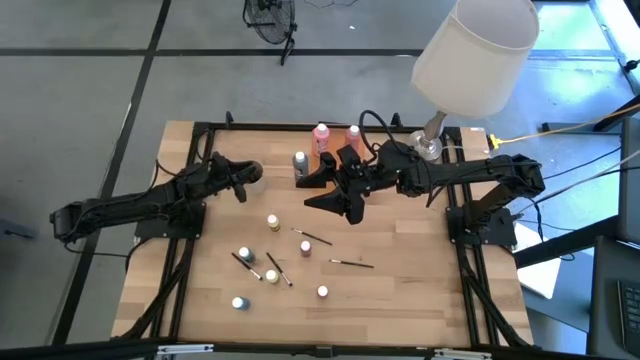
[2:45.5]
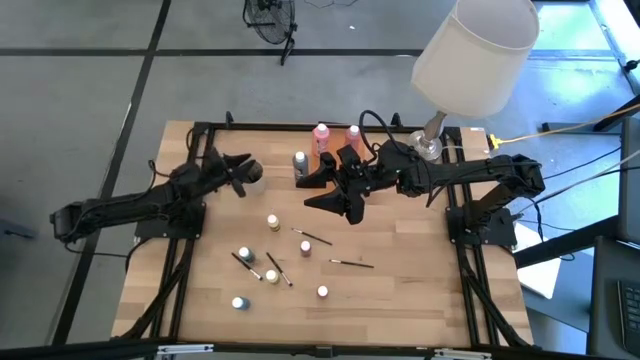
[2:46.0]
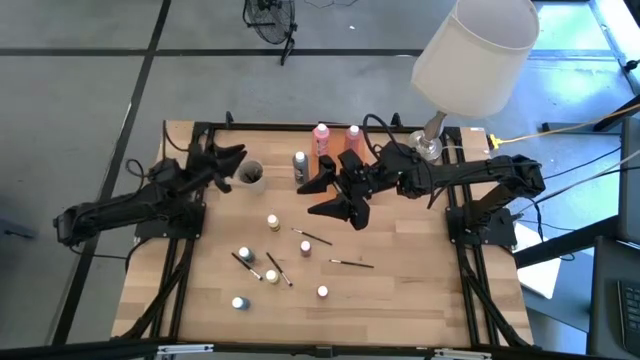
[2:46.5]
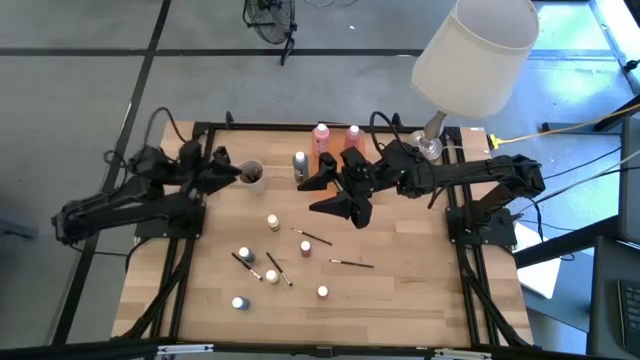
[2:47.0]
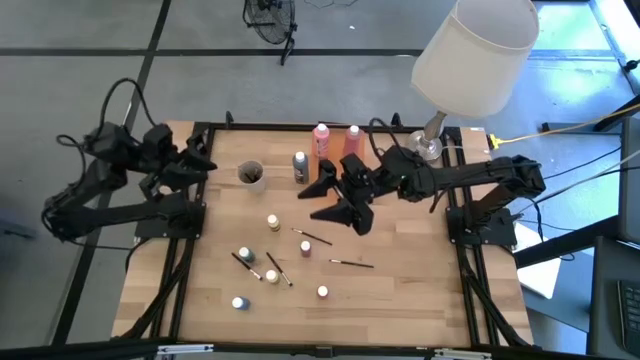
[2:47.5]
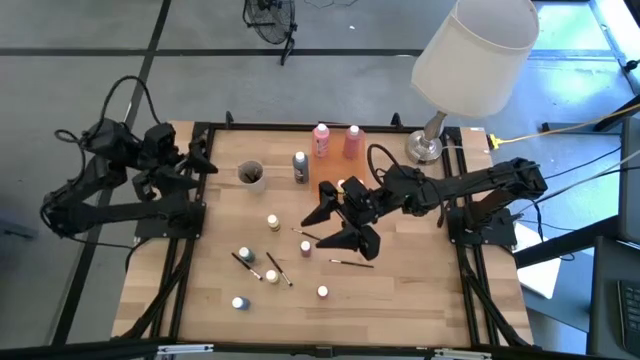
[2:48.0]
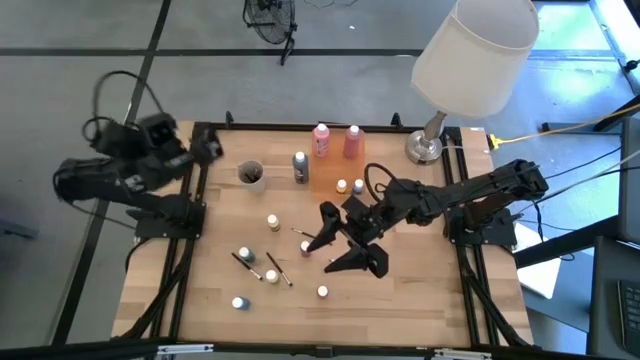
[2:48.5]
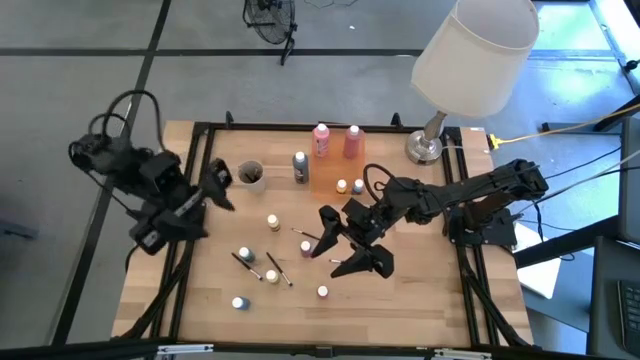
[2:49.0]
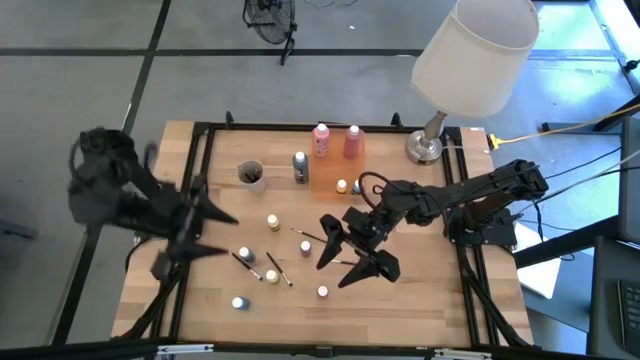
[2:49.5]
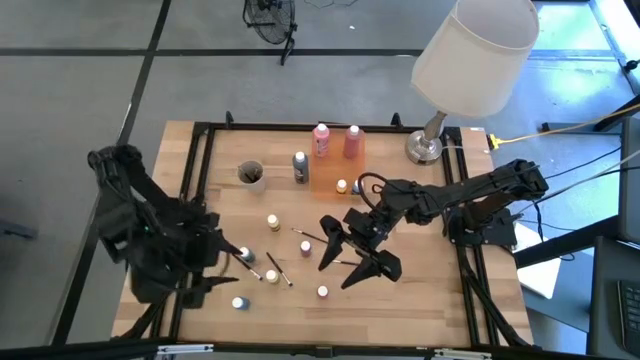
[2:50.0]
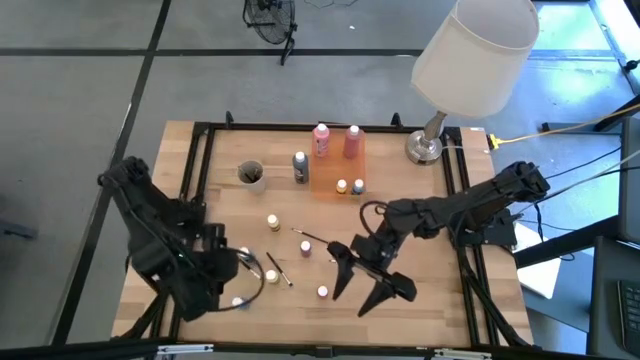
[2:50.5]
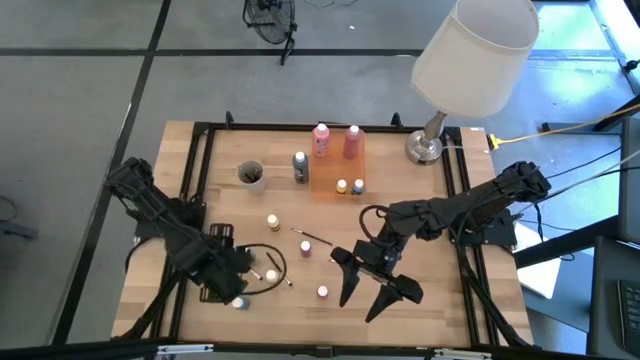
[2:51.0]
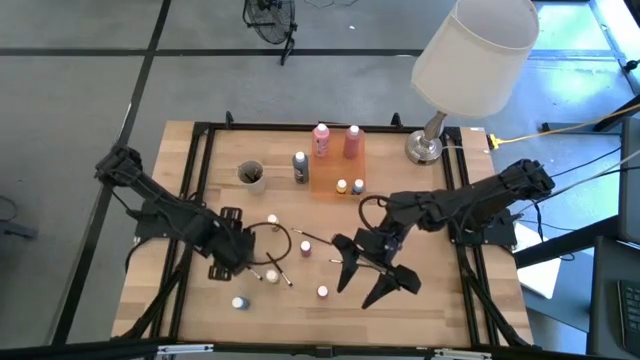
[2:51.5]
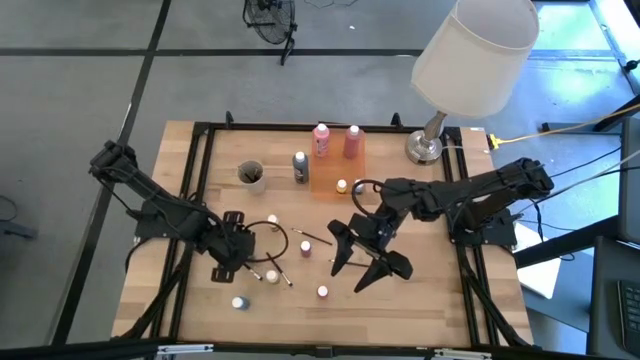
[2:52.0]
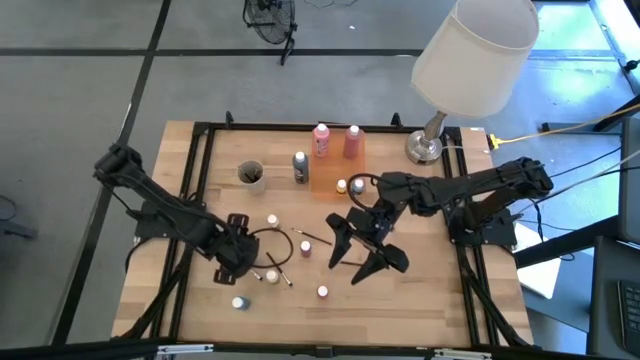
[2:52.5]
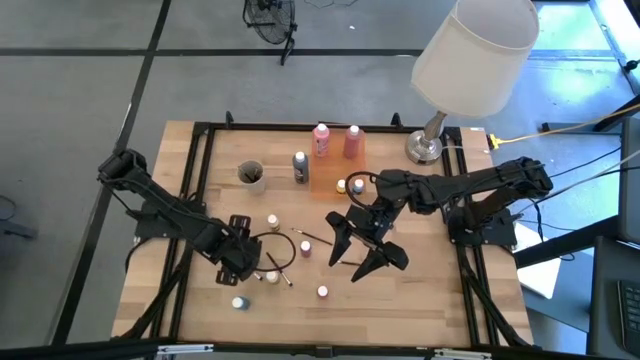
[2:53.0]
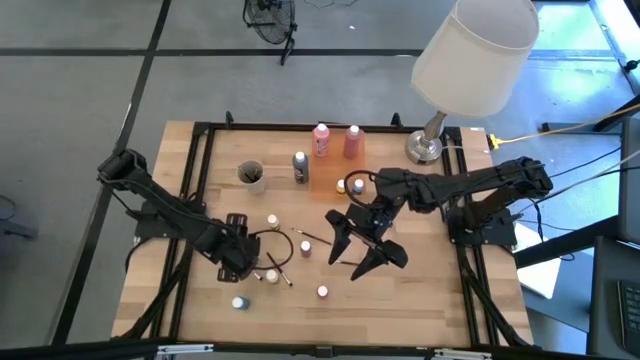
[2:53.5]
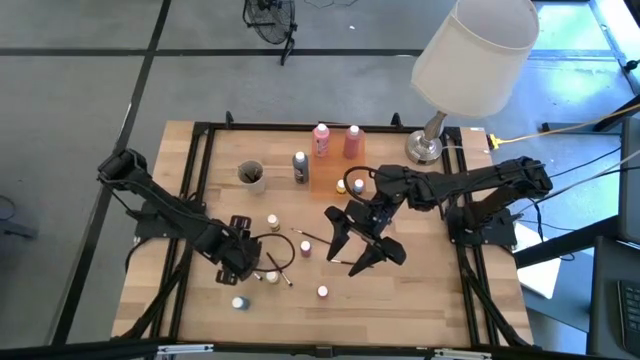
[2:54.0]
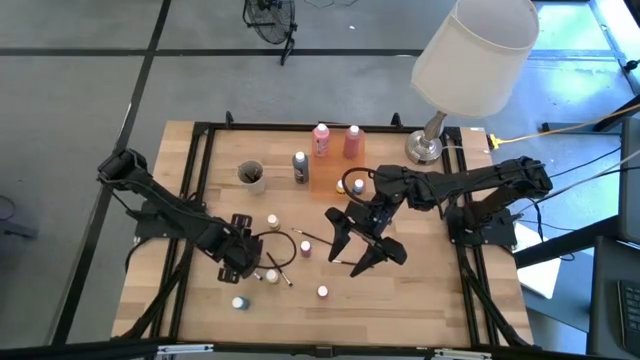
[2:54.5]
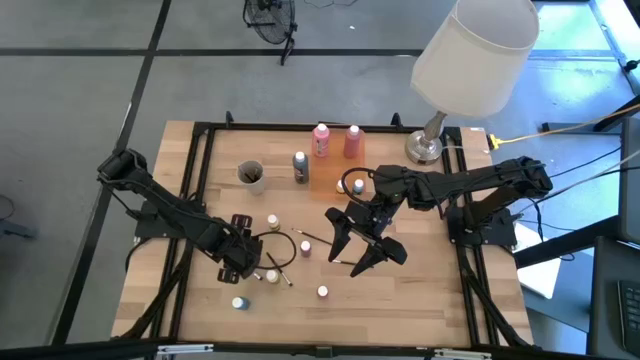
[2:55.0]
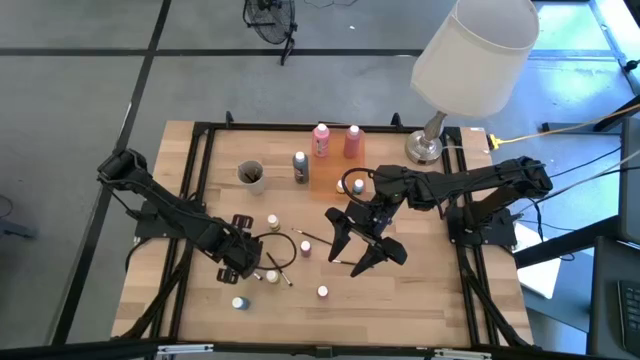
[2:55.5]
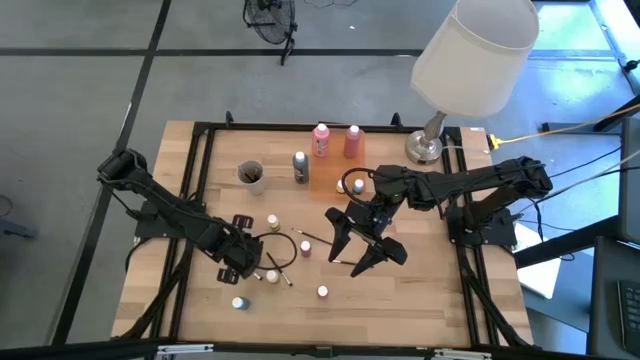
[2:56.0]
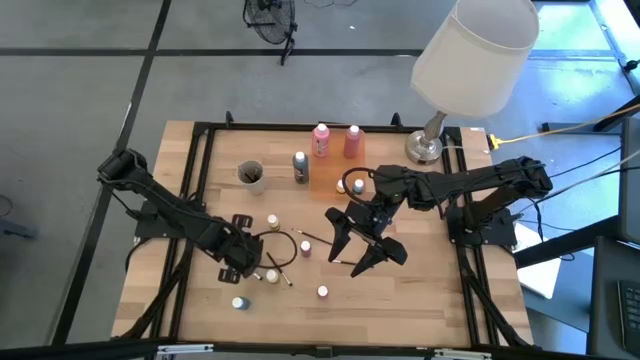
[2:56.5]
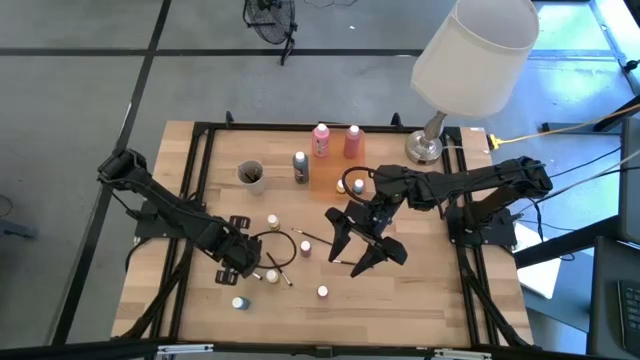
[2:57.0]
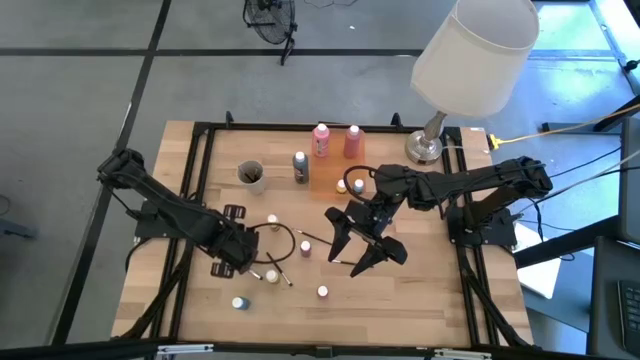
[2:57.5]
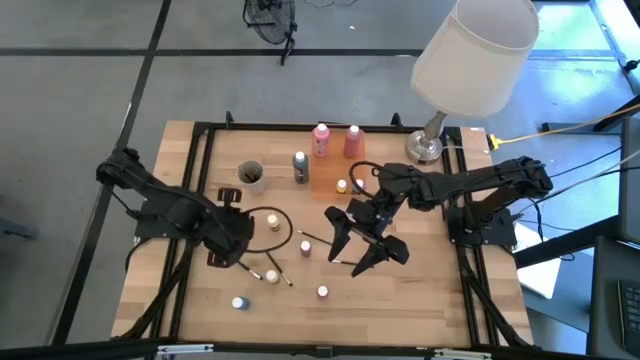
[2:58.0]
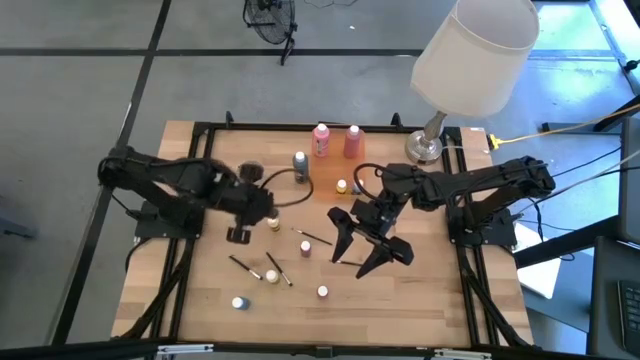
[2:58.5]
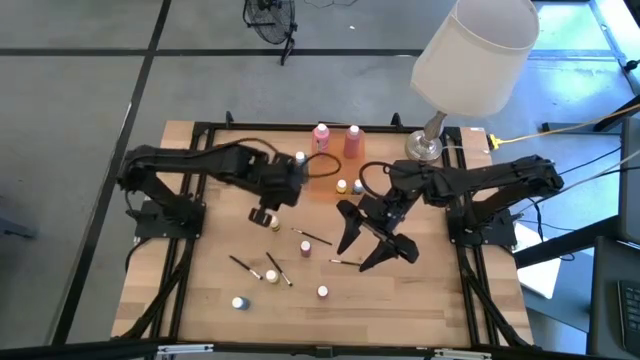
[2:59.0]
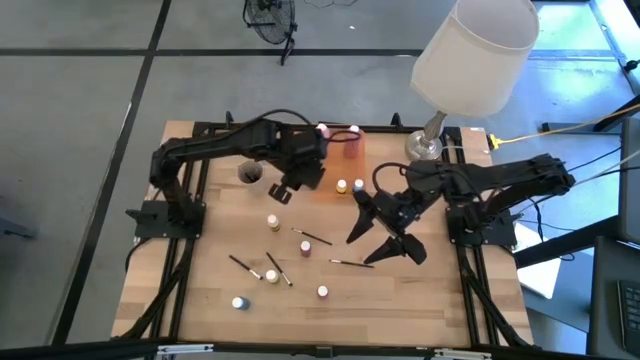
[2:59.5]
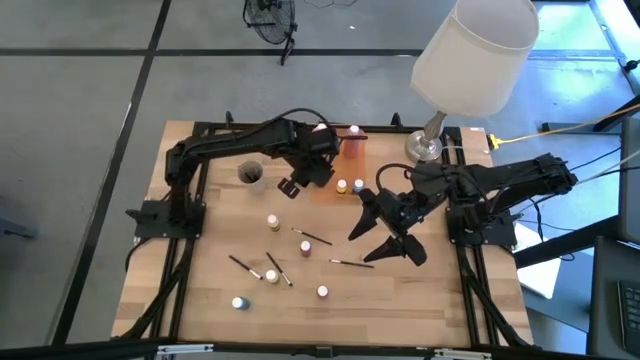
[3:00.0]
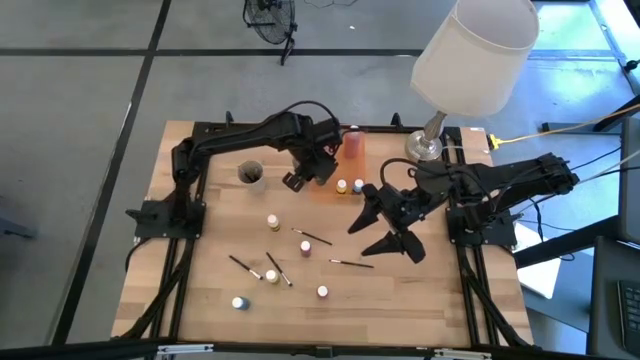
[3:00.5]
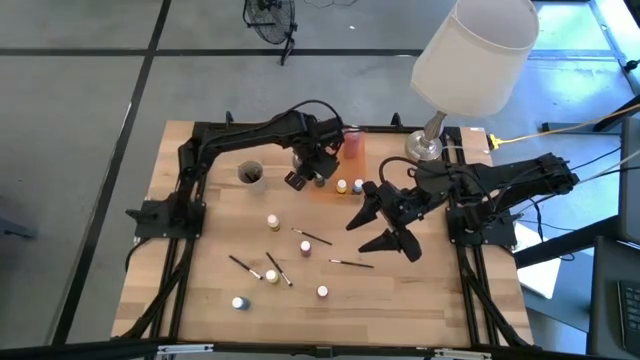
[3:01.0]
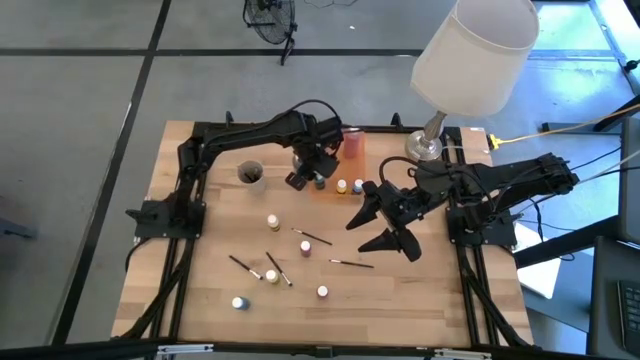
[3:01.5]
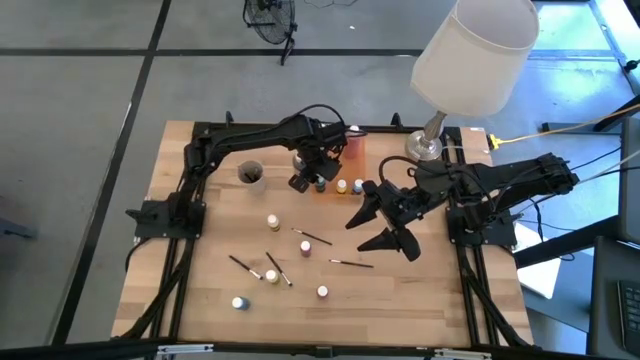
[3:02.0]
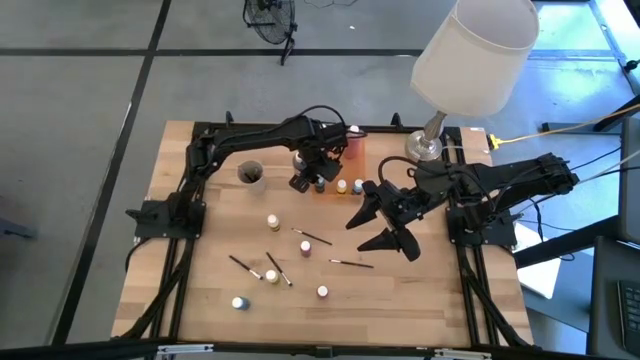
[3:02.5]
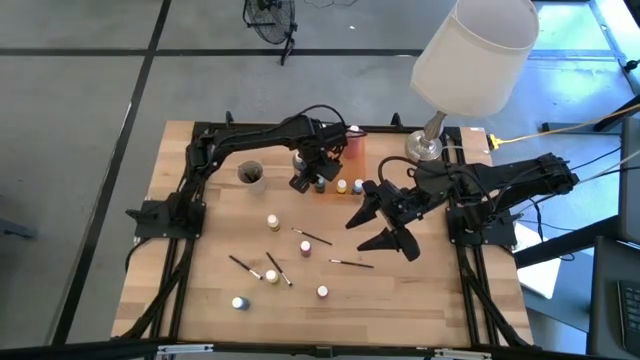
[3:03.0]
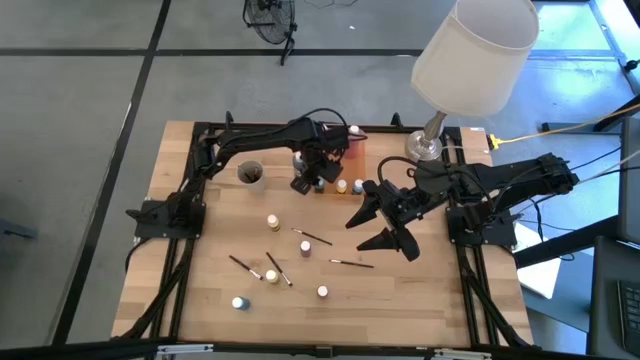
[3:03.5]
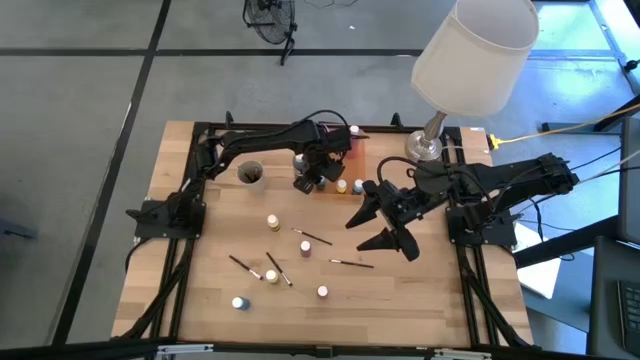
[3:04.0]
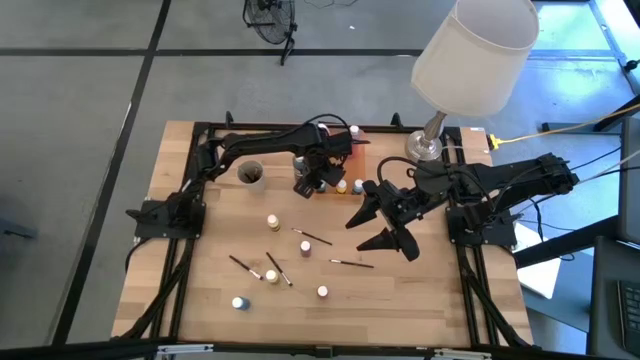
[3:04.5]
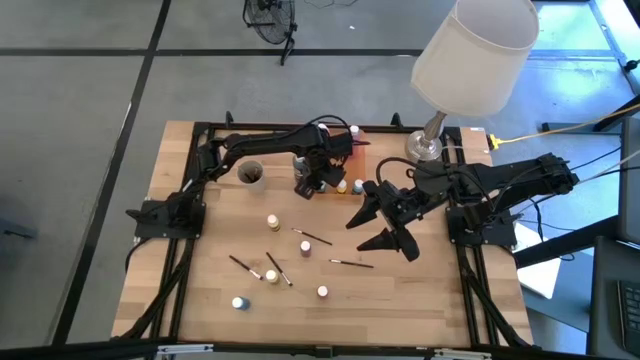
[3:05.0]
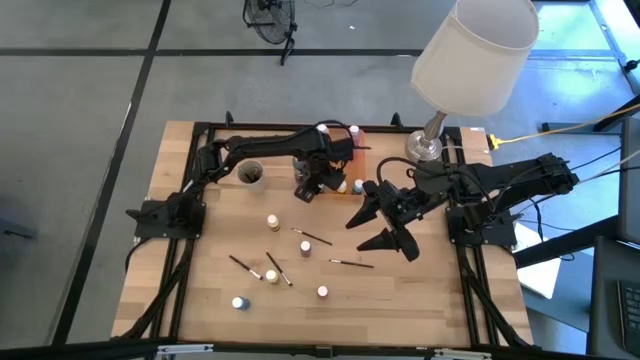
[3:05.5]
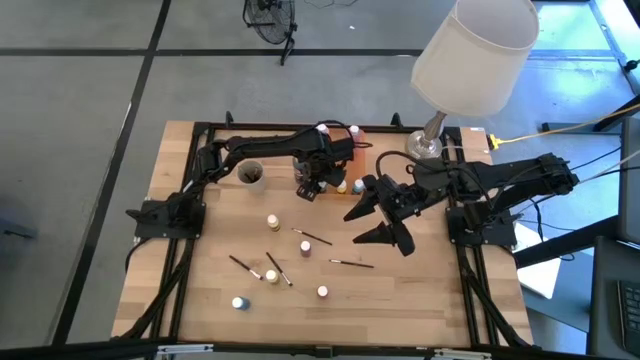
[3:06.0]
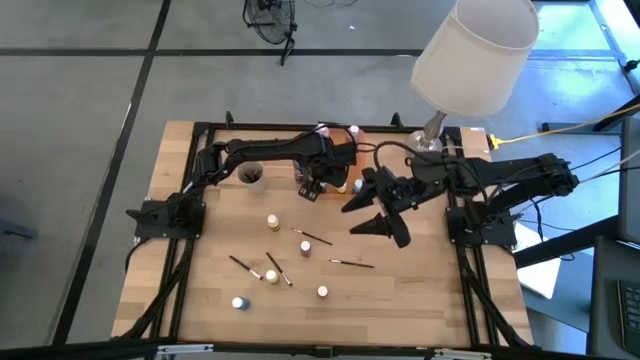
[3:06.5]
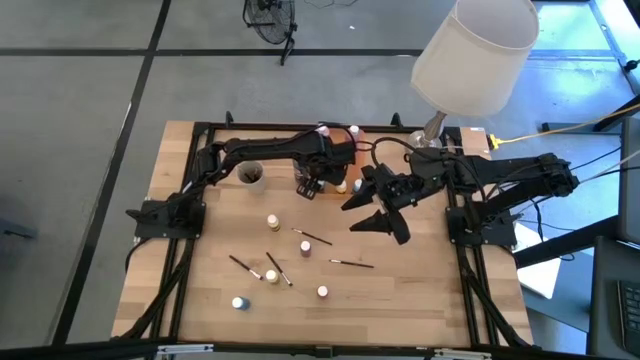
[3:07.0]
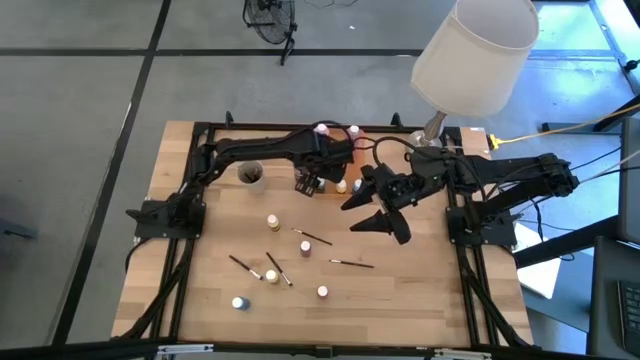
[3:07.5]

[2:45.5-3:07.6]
Task: Pick & Place Paint Supplies
Put the small green paint bottle into the orange bin
